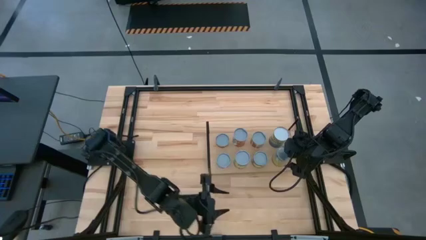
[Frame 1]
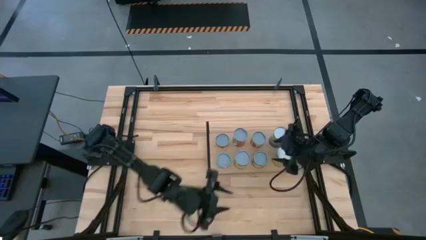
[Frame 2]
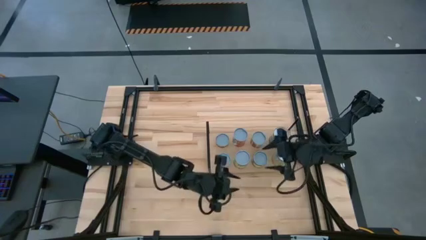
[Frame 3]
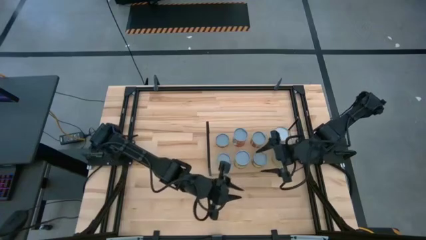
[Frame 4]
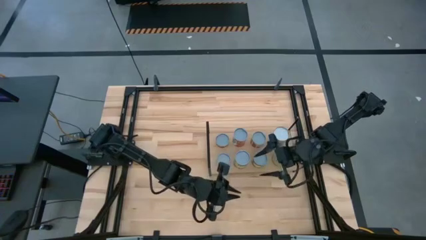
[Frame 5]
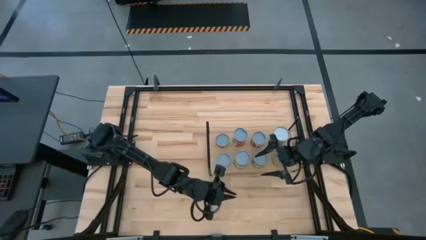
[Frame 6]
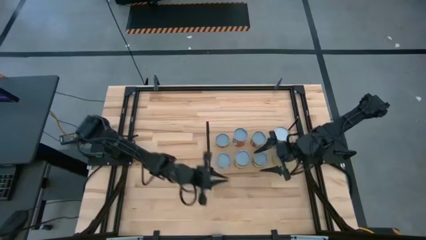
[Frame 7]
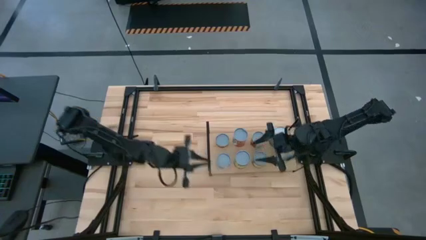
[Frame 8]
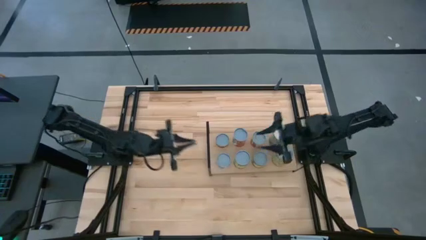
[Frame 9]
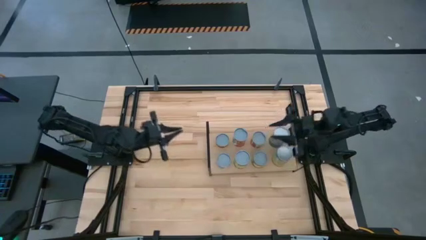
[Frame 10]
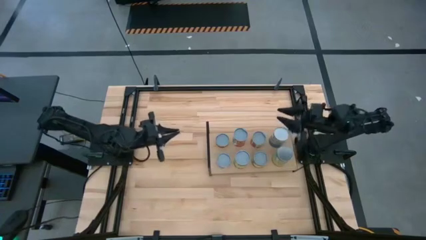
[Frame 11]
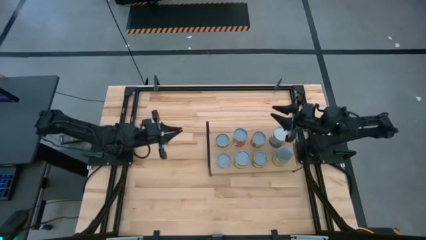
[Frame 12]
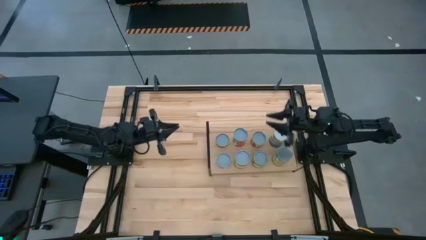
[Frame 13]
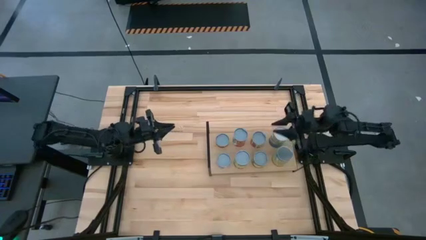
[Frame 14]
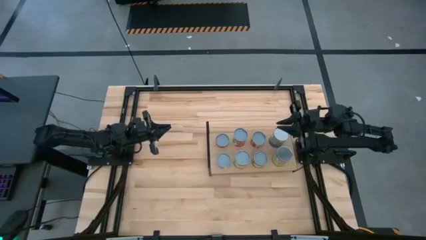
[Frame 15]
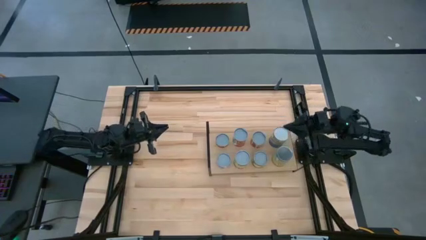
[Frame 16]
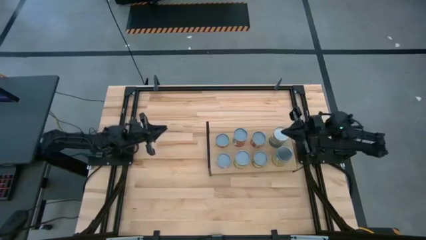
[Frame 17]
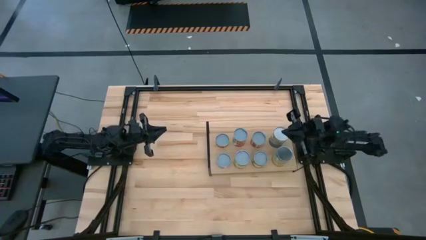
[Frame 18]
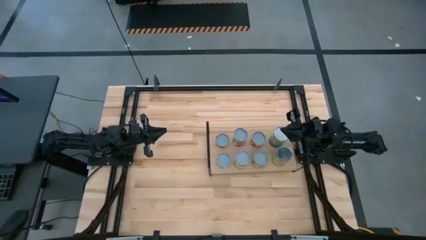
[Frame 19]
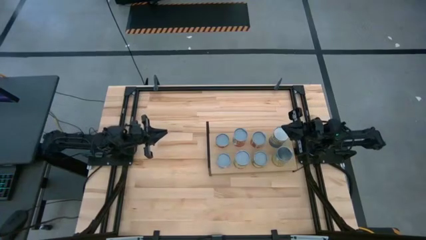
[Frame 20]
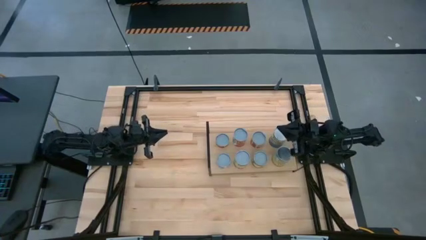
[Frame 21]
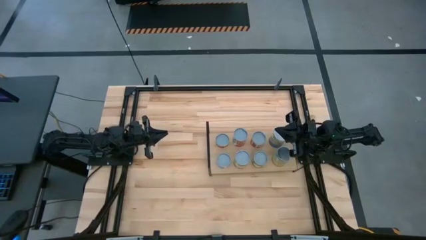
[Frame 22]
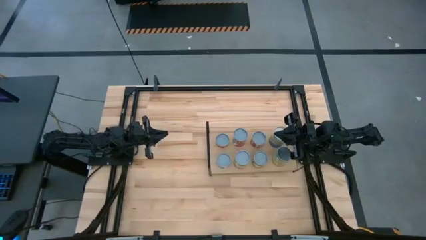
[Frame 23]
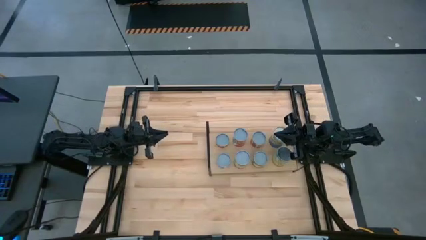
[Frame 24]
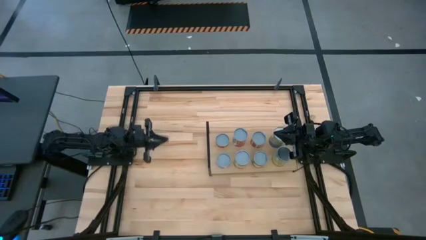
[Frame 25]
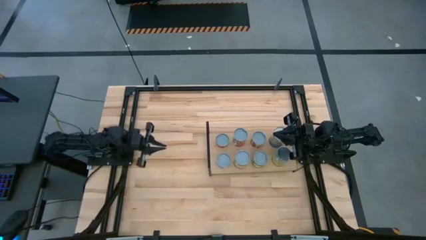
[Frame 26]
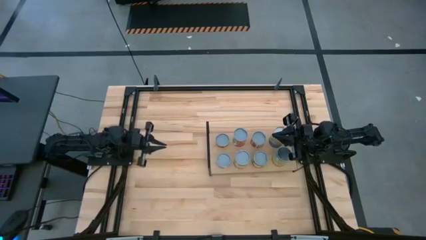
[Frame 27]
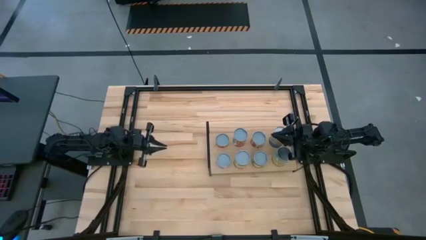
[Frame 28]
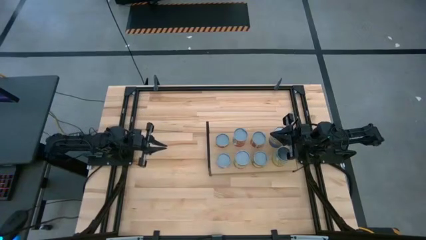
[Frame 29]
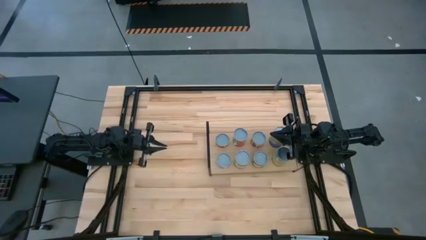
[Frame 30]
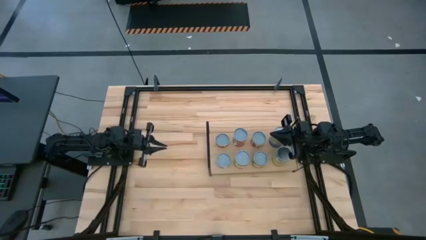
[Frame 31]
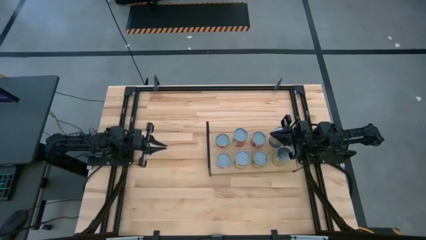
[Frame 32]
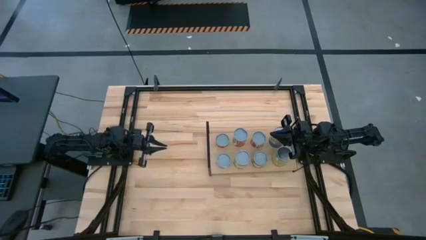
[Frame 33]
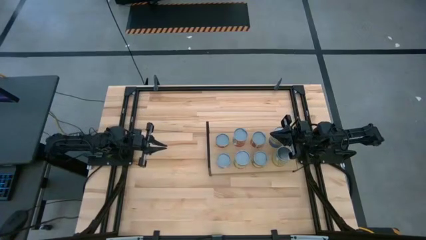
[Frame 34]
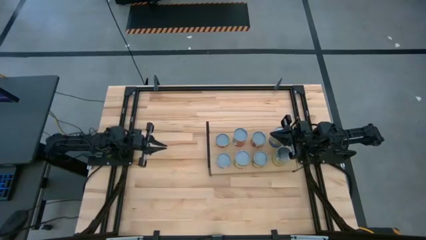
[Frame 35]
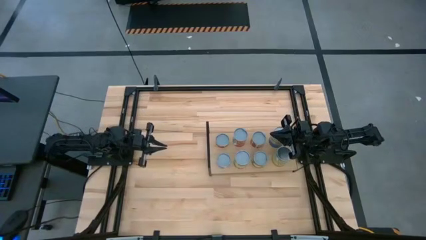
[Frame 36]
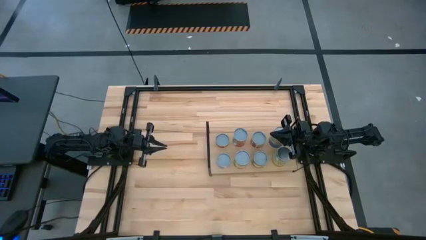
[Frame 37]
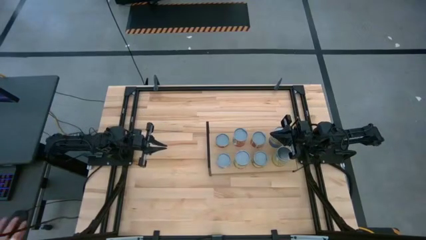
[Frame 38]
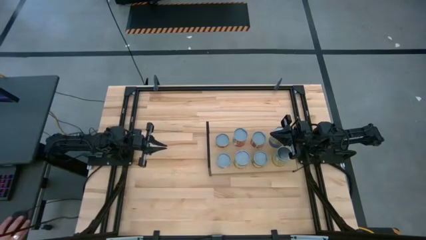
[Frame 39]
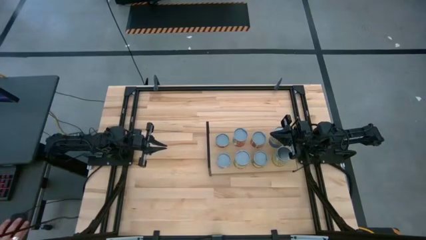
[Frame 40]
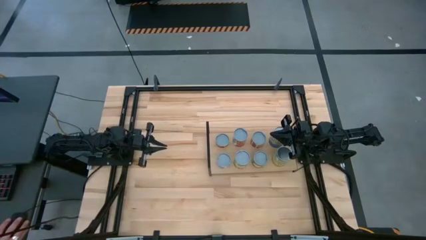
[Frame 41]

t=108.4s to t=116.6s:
Task: Pick and place cans onto a shelf
Return to Home Position

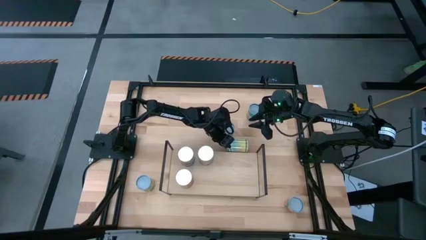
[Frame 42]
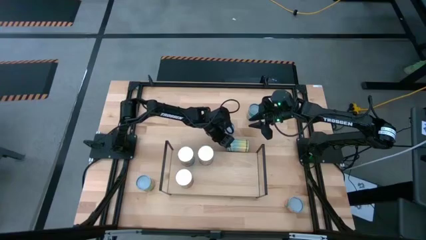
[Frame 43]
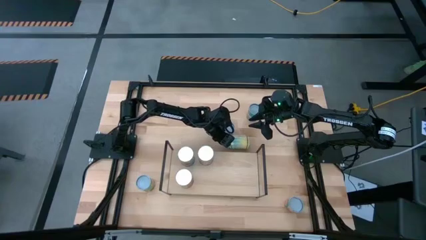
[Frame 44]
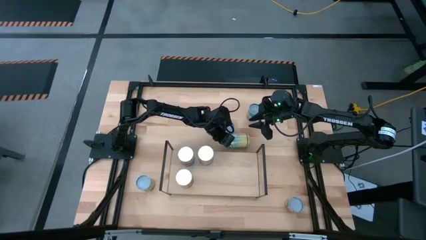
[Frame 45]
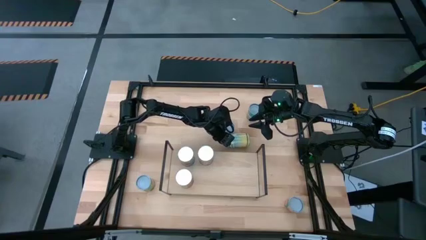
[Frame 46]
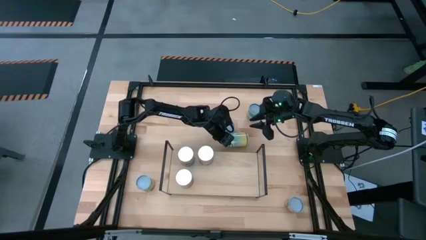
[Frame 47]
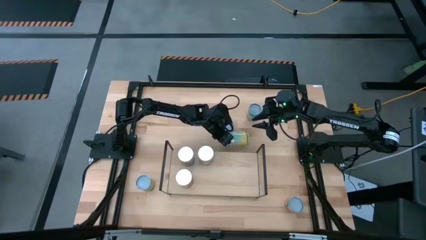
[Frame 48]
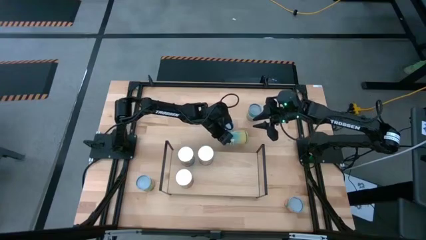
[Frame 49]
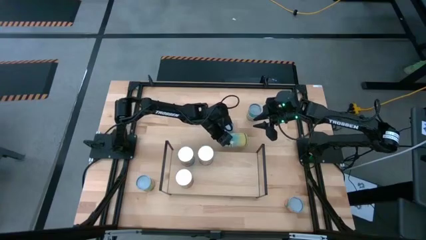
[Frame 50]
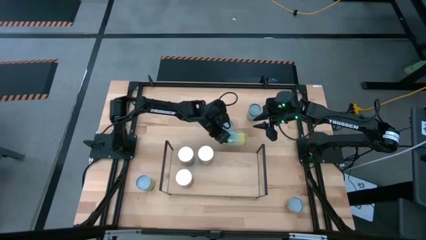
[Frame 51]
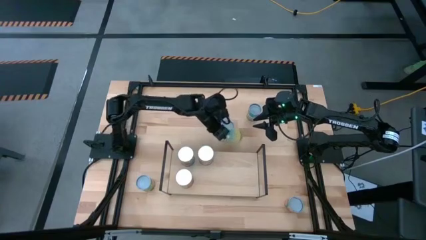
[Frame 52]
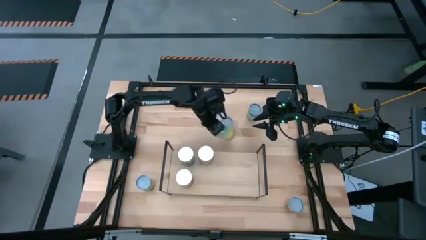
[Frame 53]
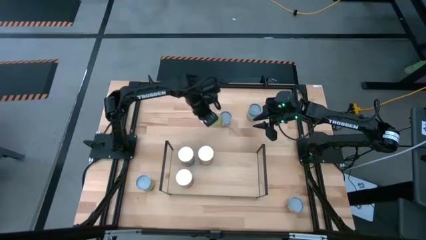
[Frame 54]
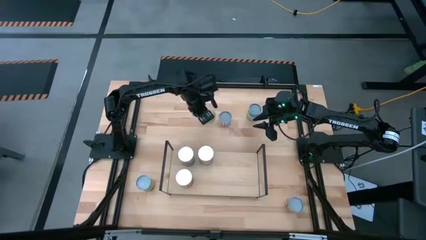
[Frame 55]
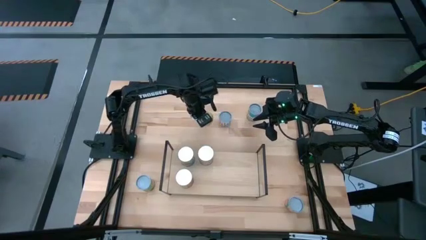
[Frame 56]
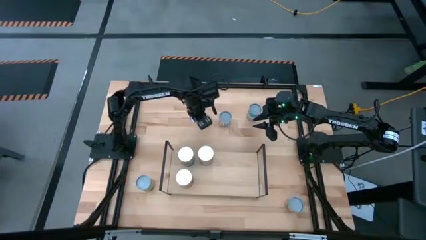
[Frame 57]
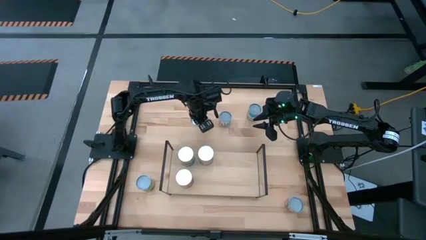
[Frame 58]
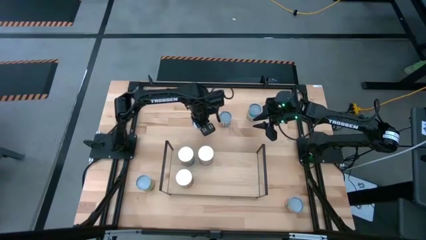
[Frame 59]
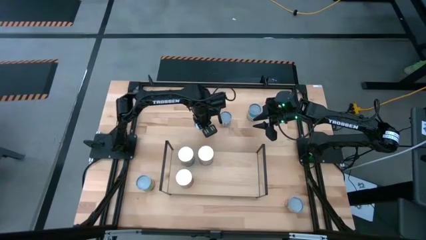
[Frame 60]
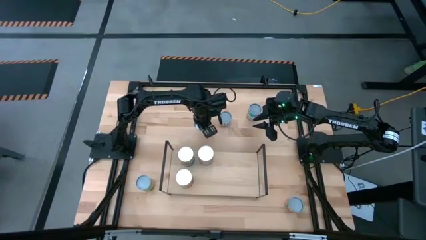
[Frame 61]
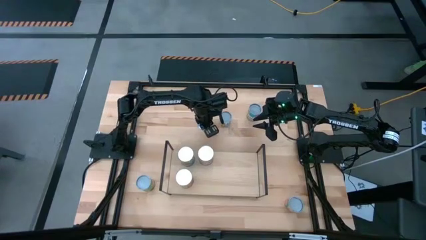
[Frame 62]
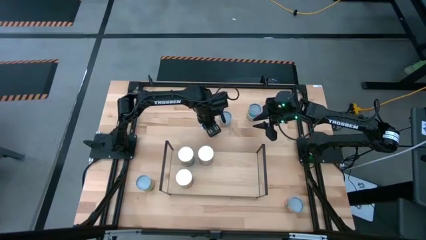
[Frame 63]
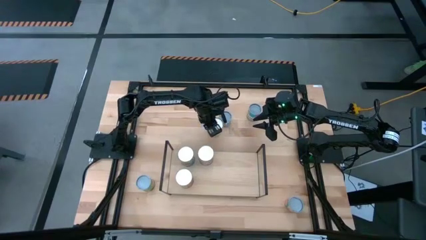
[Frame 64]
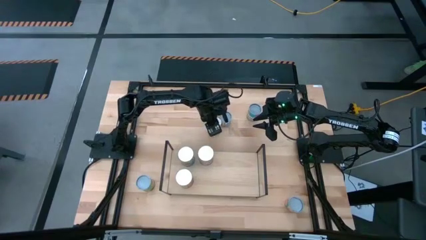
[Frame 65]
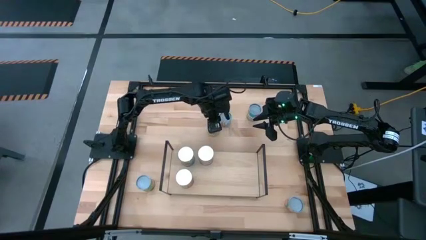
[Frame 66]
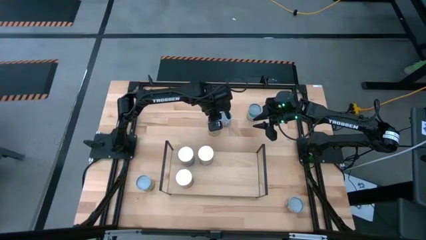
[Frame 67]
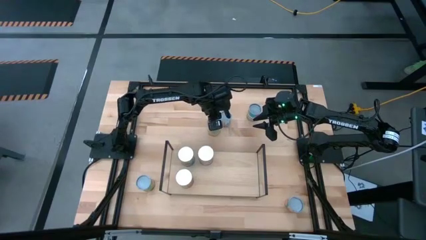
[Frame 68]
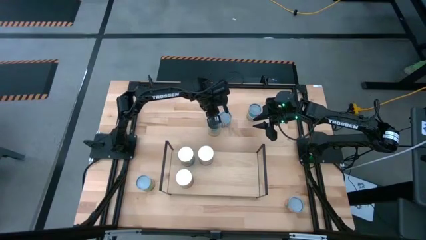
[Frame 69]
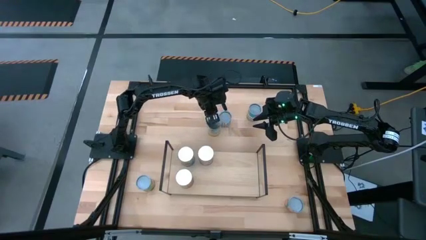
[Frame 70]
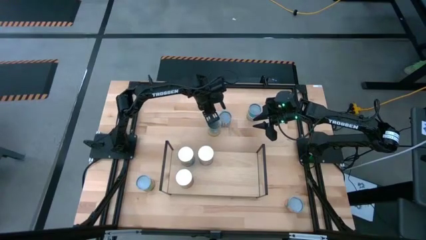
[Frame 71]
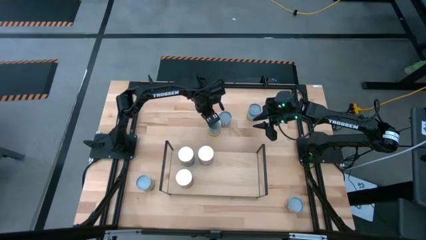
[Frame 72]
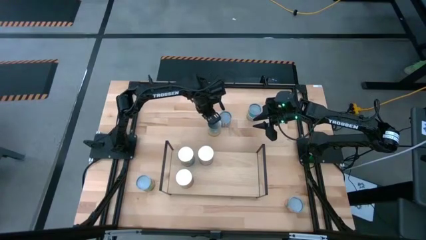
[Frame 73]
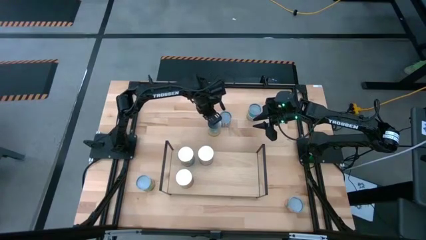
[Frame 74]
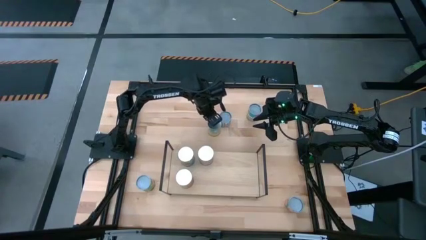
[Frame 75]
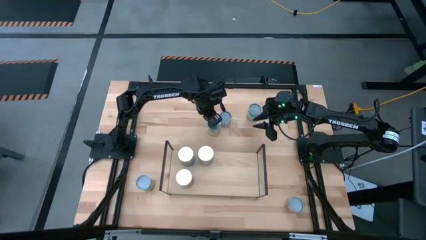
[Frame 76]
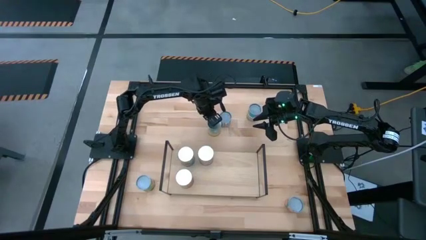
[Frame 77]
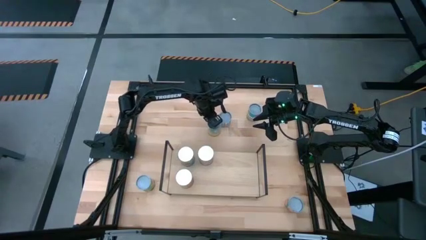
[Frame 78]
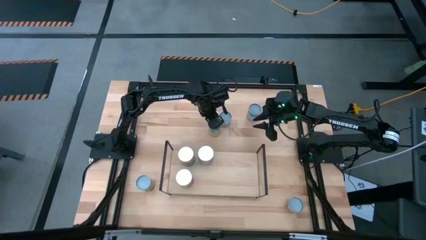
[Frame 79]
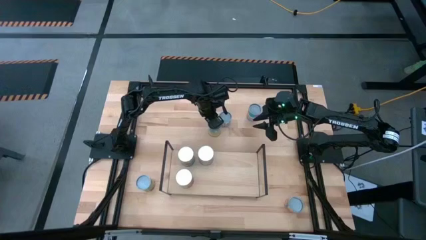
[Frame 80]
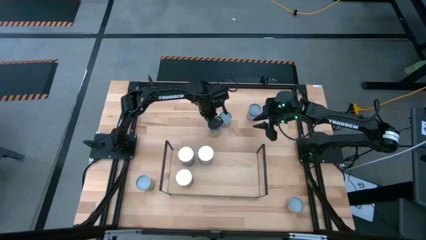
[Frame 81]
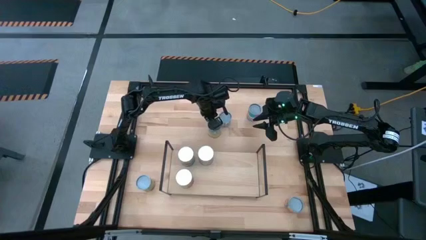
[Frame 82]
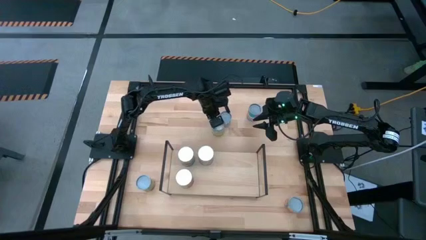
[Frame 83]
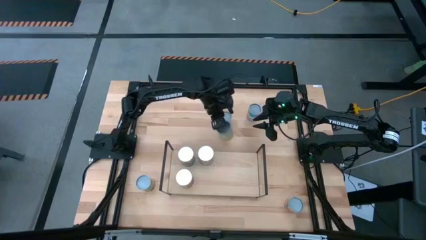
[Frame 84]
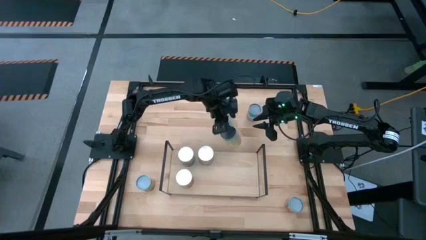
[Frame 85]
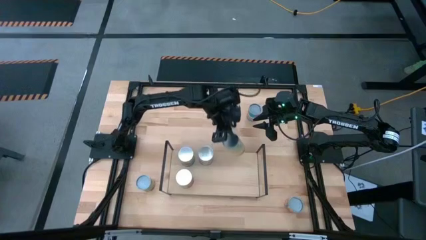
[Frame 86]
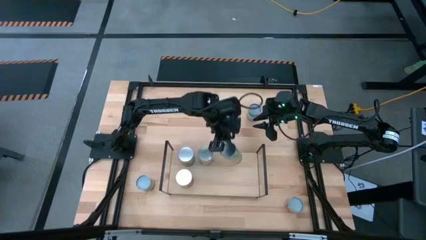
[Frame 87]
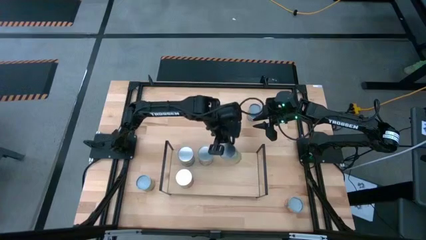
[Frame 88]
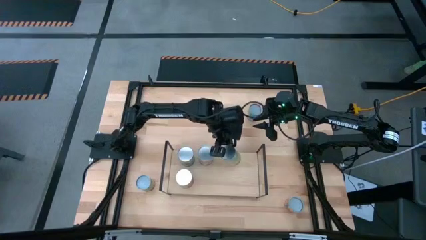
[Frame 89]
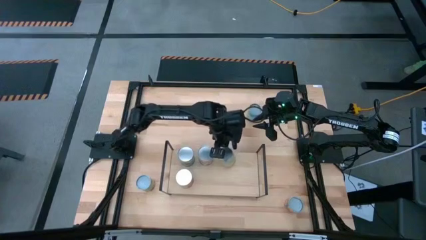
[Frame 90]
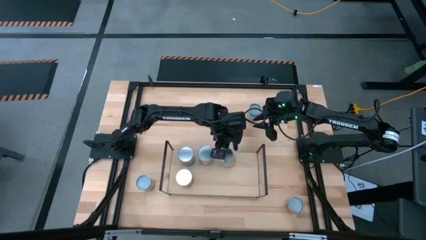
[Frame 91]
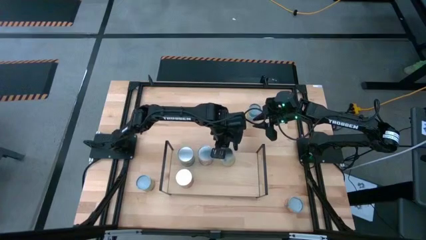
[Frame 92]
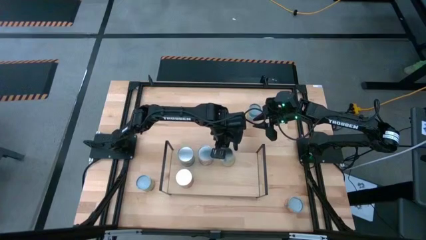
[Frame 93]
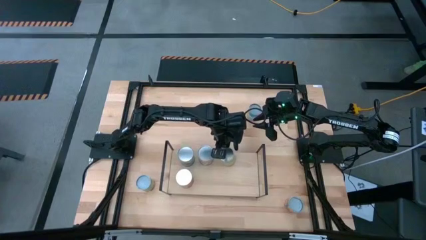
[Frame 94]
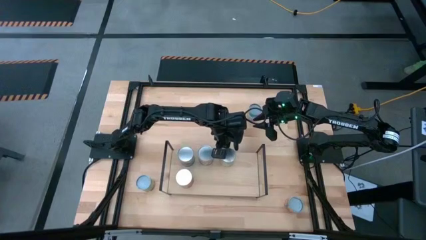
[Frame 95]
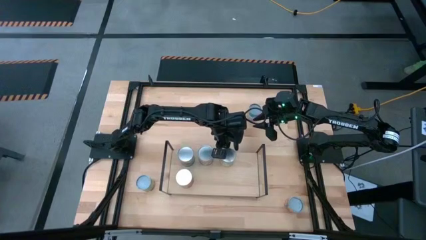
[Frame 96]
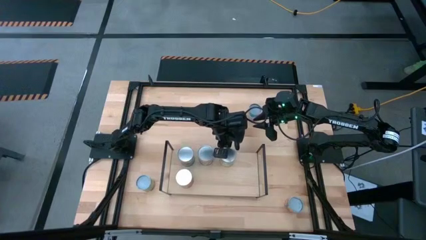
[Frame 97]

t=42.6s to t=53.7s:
Task: Pick and place cans onto a shelf
Put the blue yellow canned carrot on the shelf
